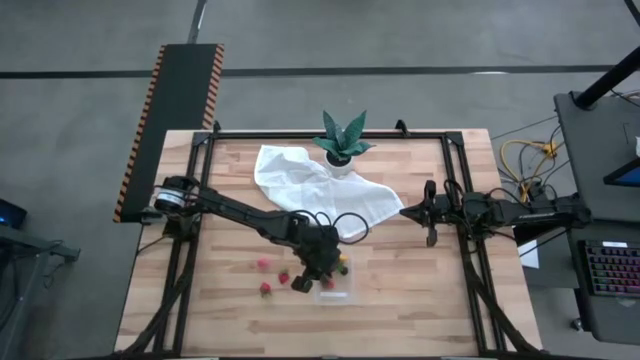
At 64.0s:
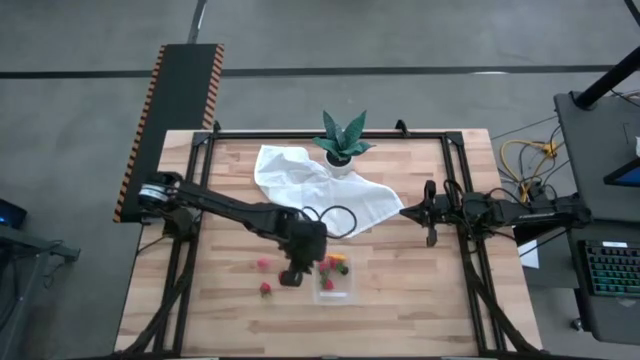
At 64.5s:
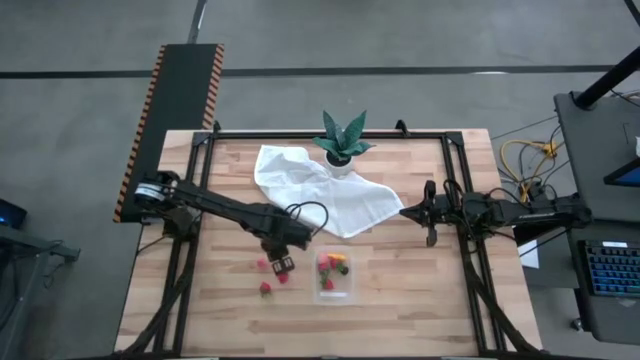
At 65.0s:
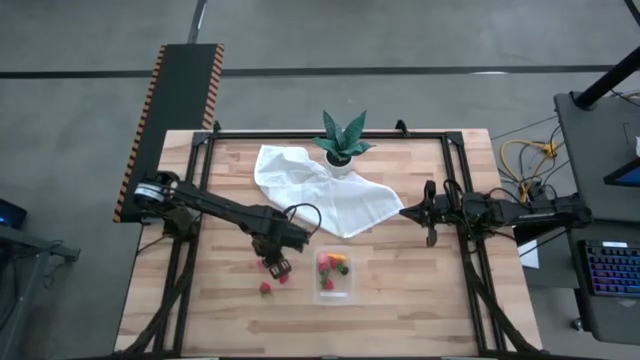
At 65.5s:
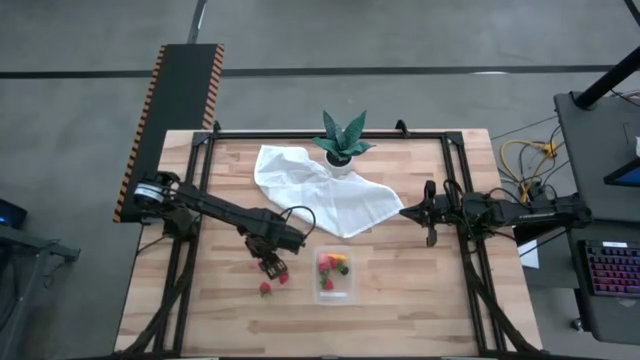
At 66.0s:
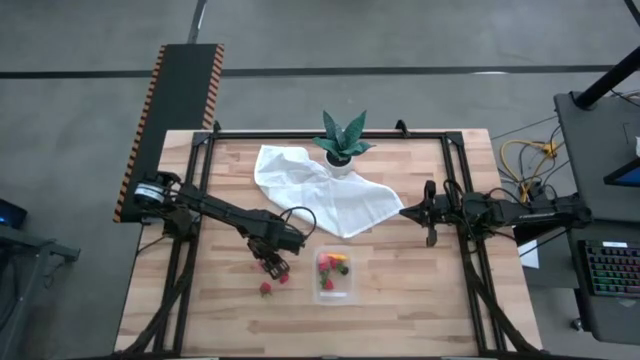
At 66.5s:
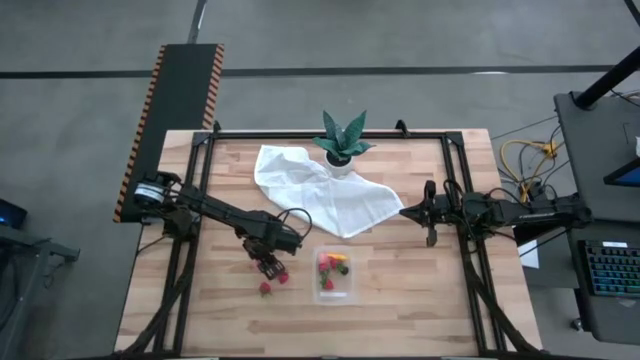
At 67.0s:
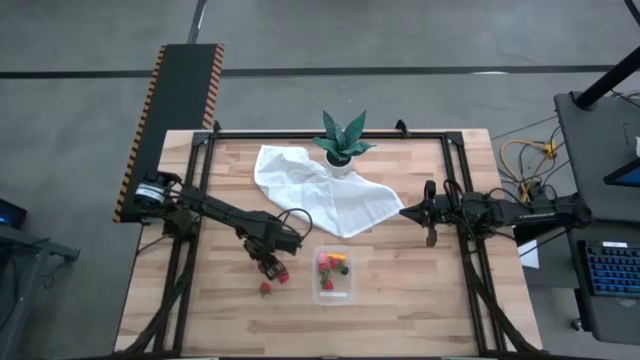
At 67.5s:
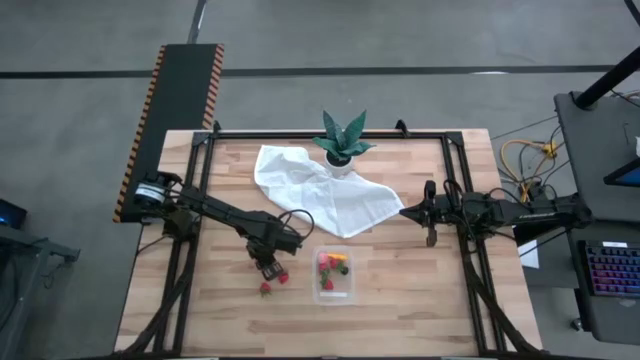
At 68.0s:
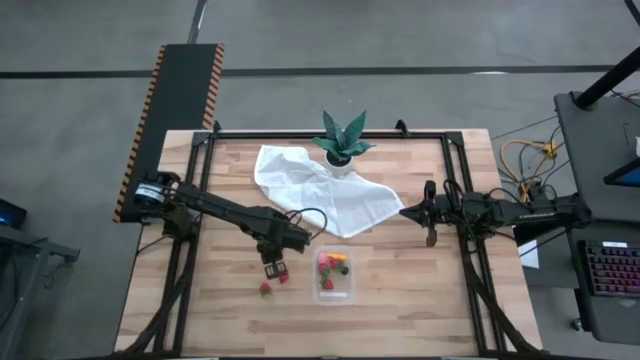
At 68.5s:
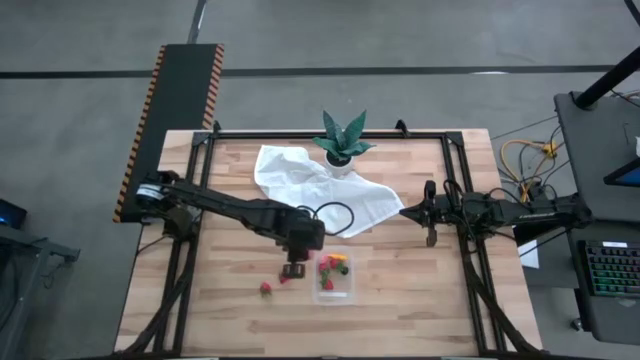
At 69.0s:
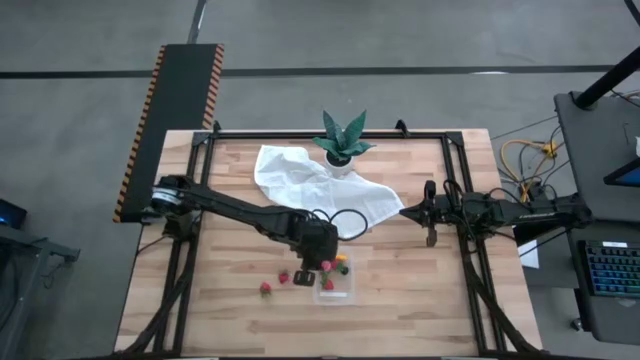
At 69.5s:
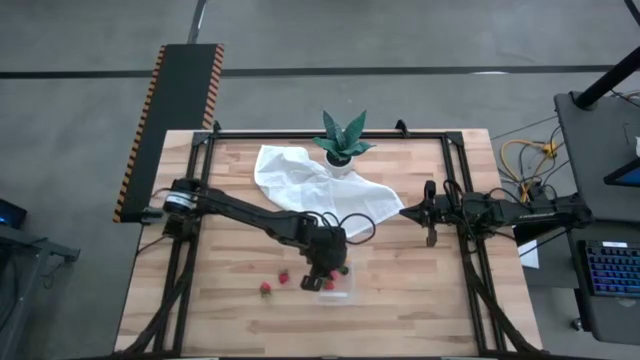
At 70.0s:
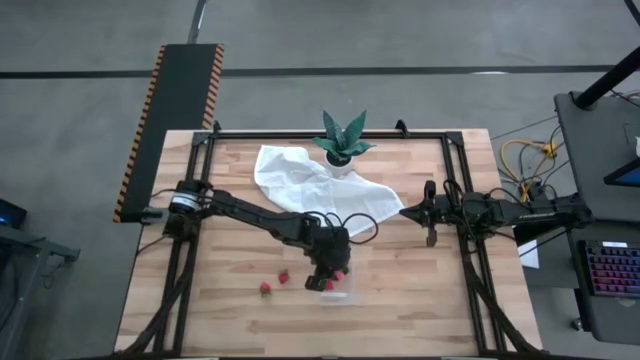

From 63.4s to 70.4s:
Task: Pick and placing Produce into tupperware
Put the red strawberry into the transparent bin

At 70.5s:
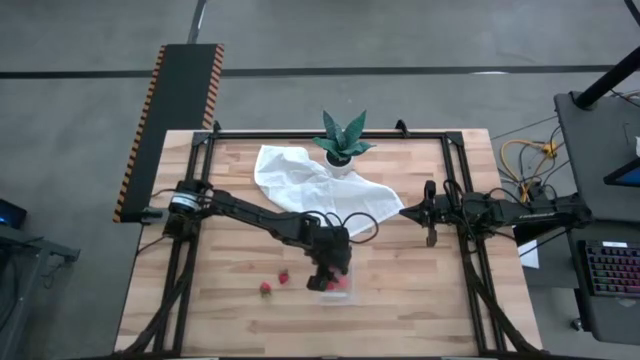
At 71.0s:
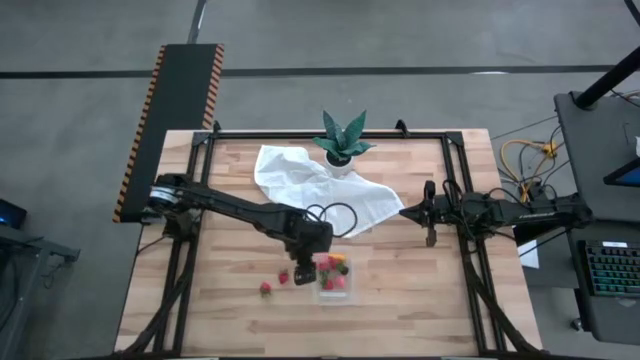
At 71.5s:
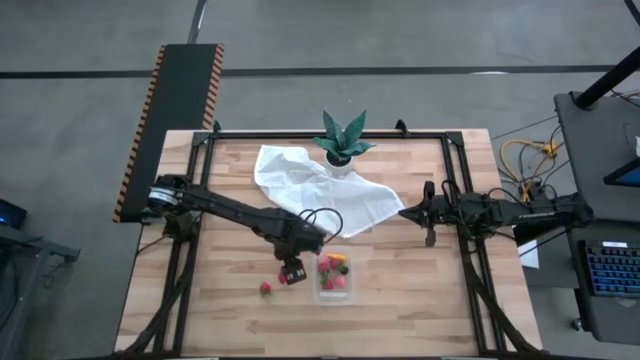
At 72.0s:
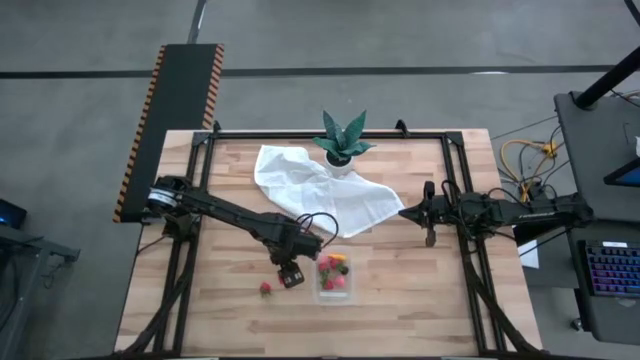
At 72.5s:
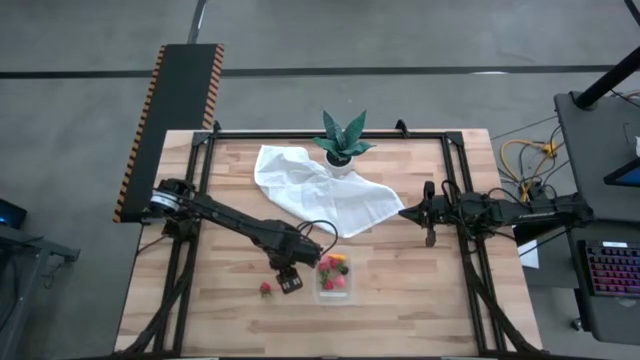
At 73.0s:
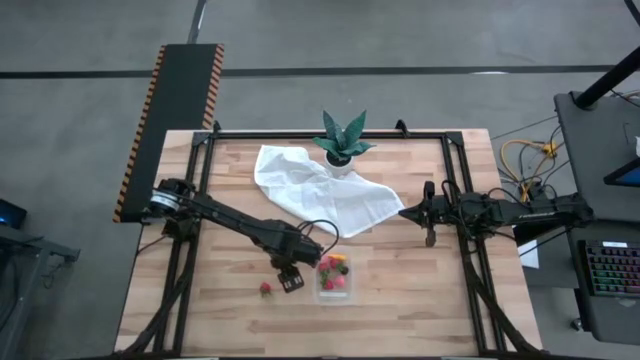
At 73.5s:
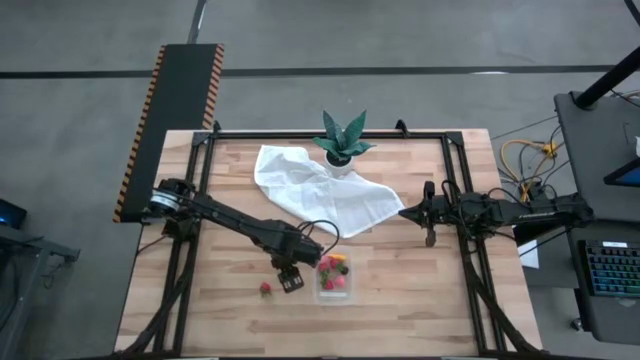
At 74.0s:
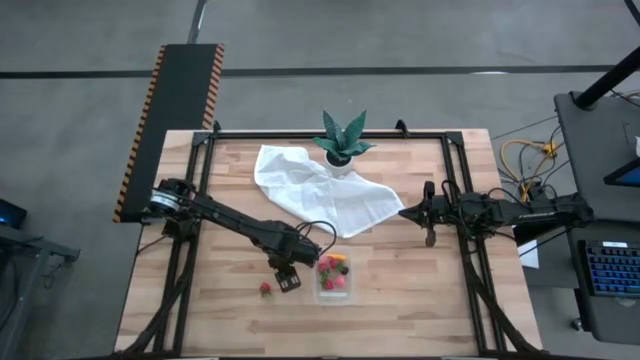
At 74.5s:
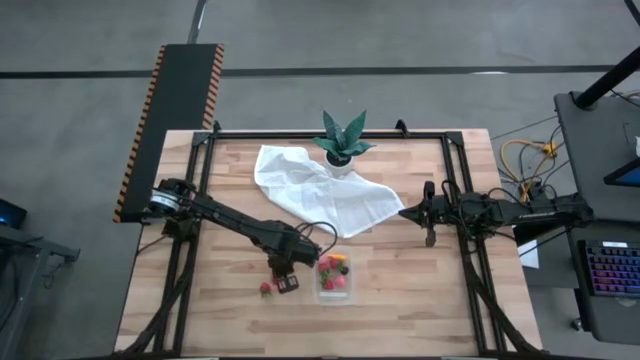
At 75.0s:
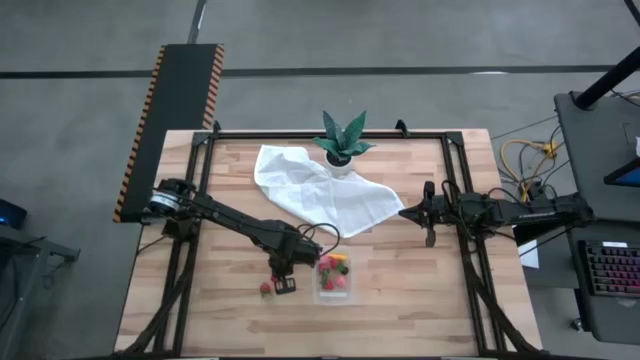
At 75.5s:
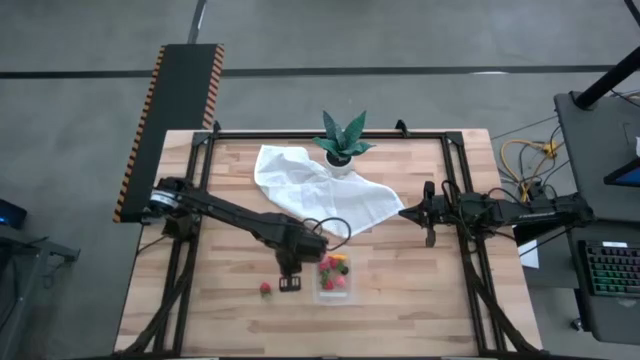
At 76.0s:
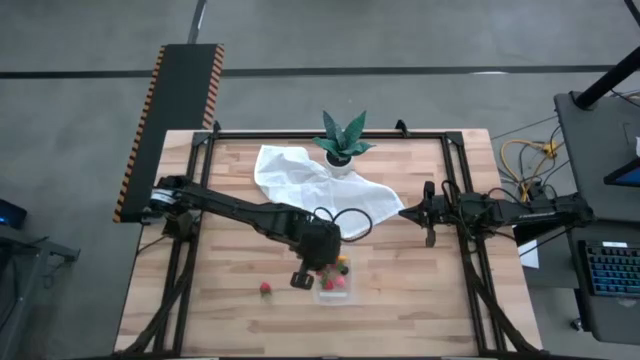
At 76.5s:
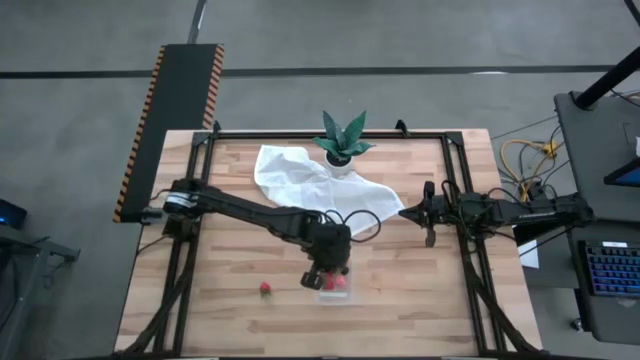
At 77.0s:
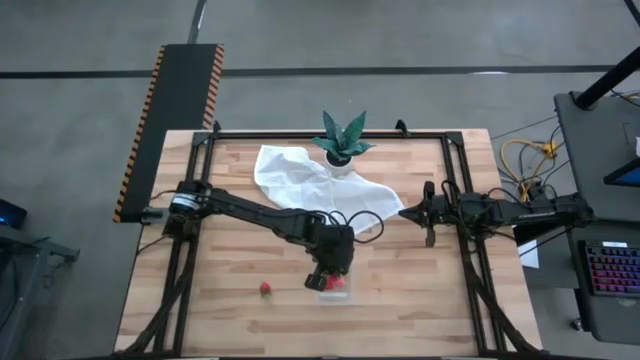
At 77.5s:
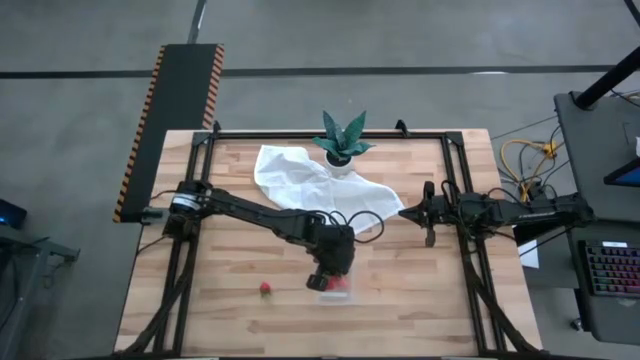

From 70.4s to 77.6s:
Put the pink peach into the transparent bin

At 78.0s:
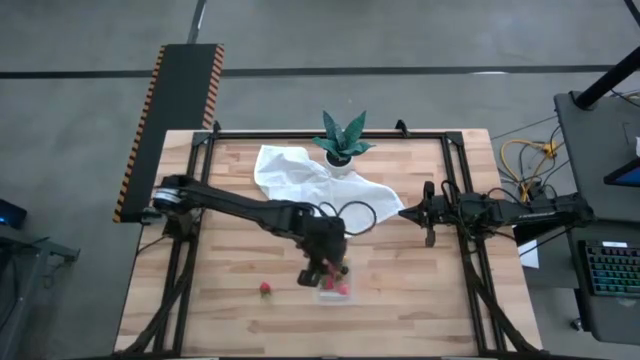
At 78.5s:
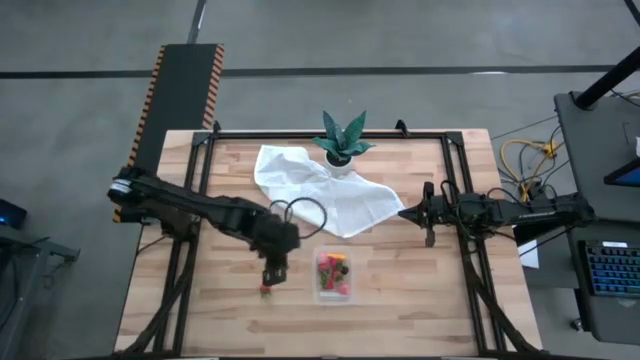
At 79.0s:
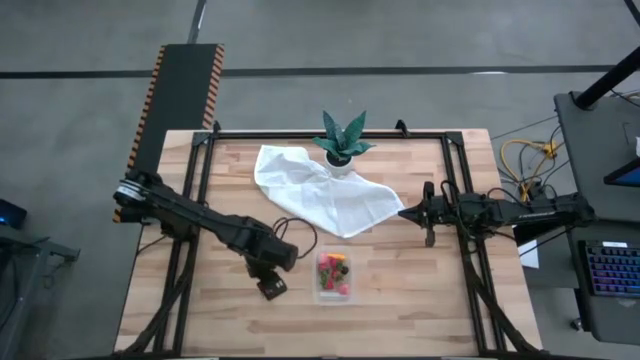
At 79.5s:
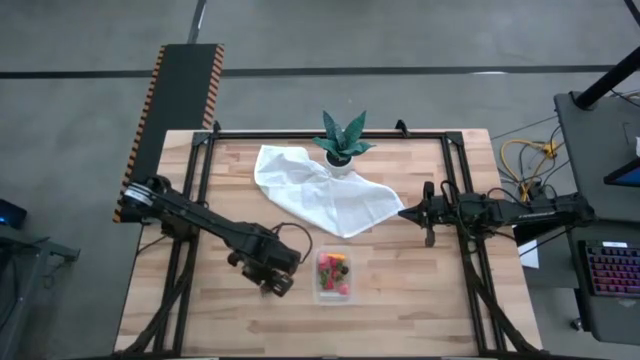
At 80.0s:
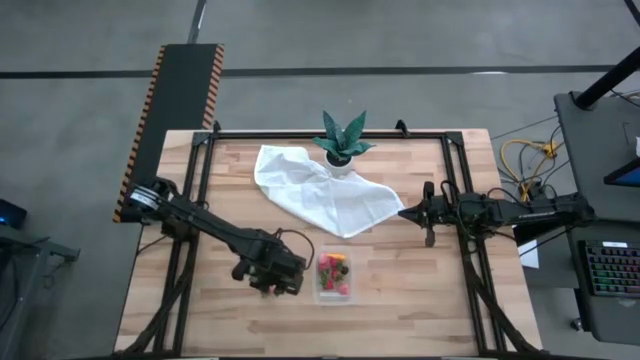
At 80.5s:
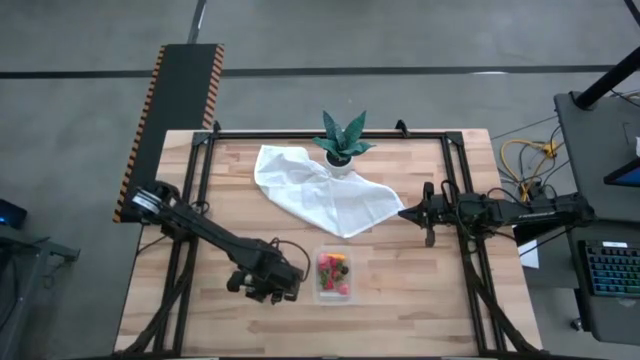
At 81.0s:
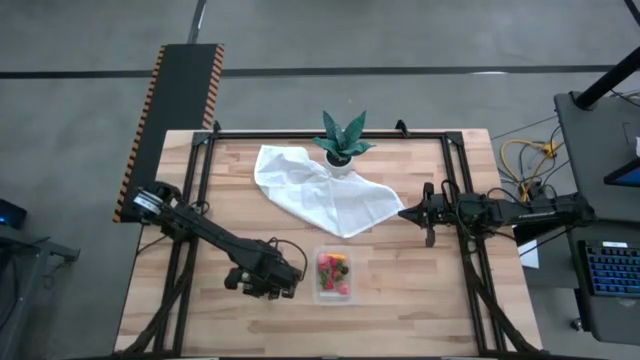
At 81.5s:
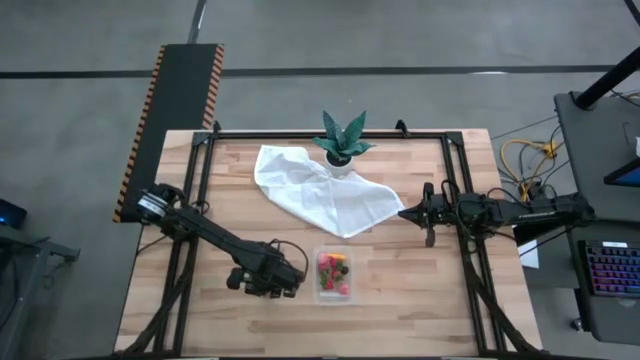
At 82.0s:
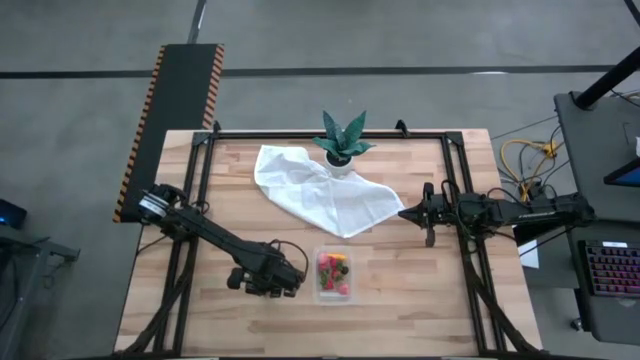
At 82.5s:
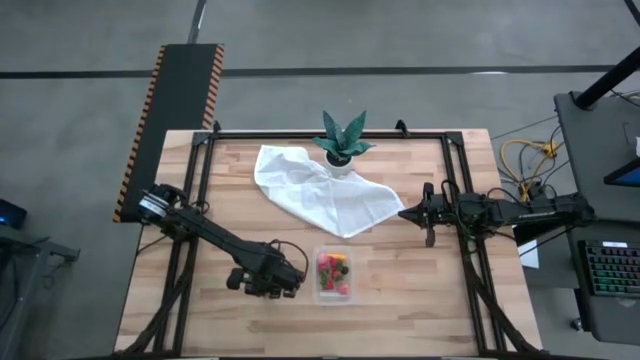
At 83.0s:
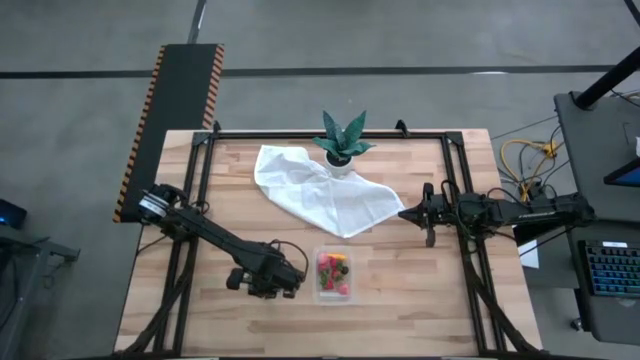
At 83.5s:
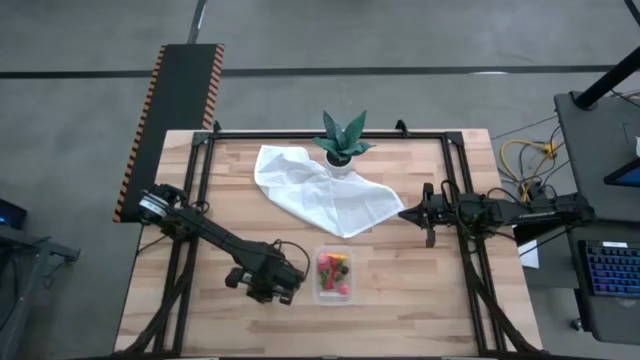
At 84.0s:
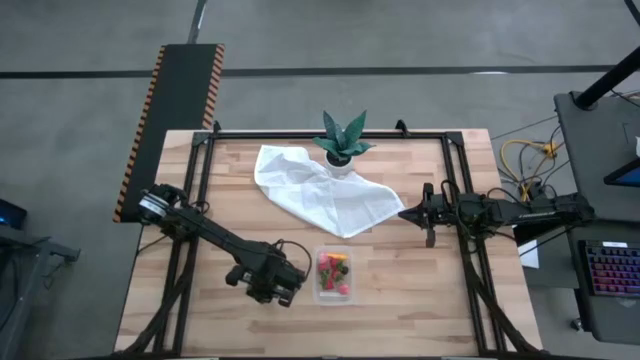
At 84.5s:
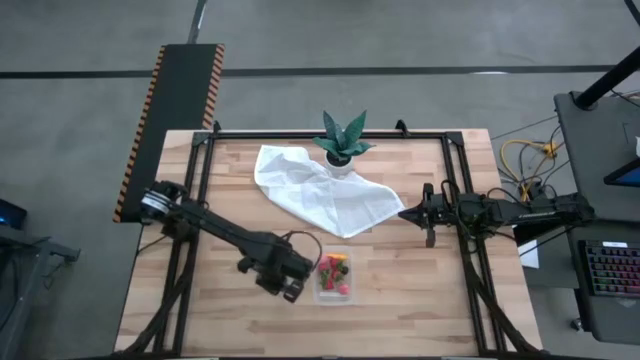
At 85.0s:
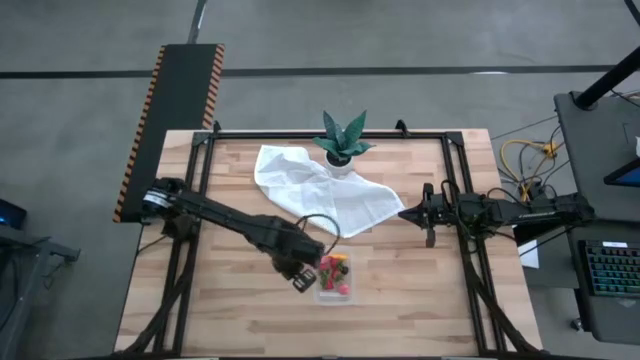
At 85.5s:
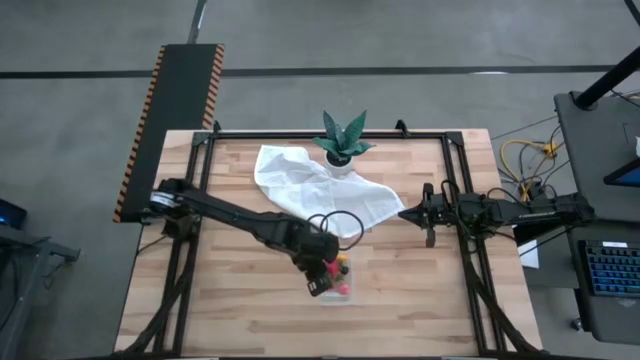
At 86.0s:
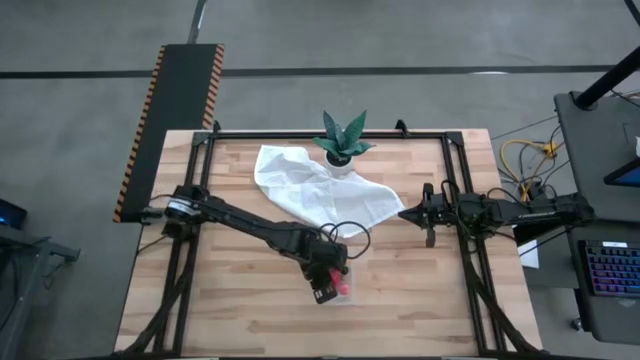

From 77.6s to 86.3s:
Put the red strawberry into the transparent bin
